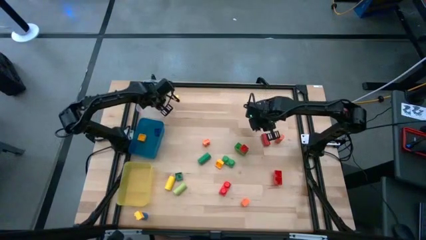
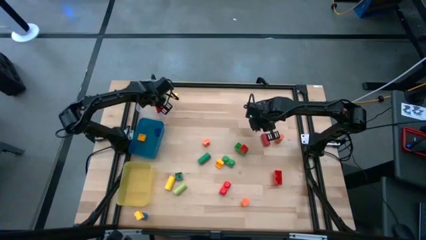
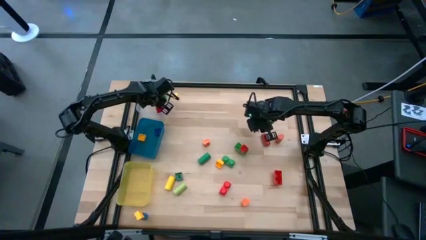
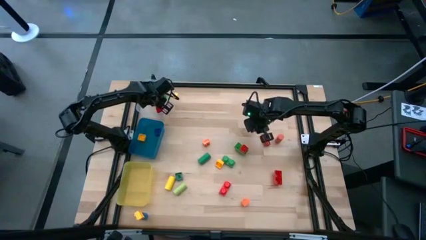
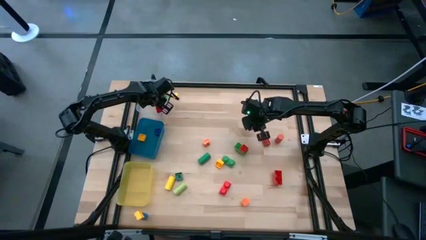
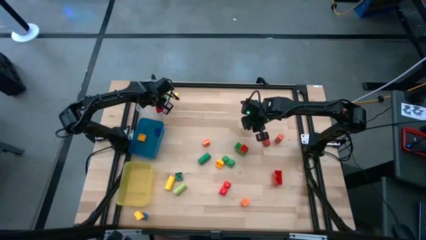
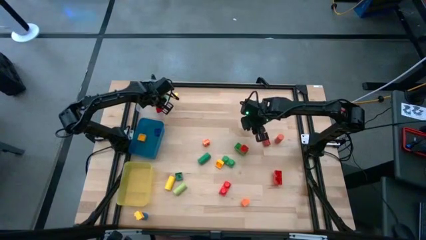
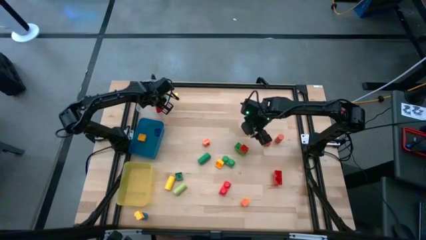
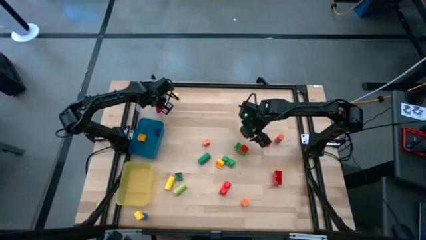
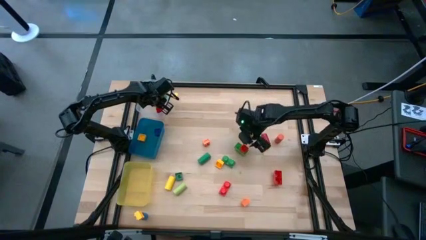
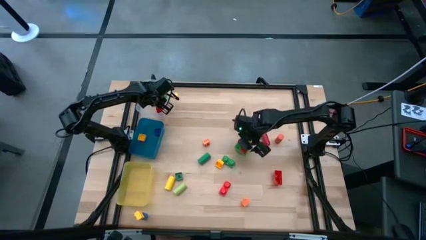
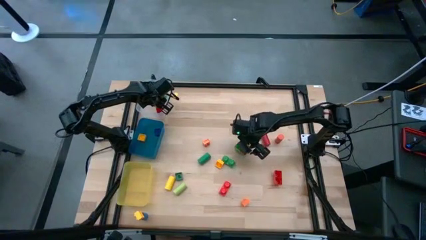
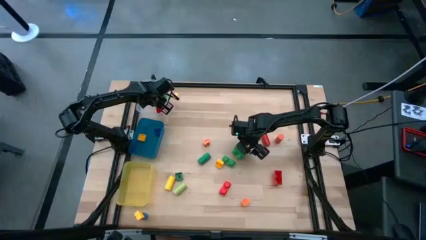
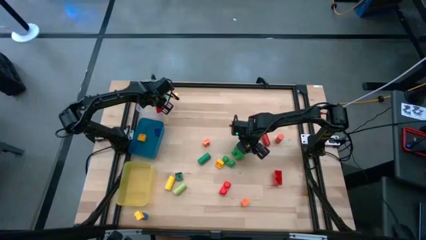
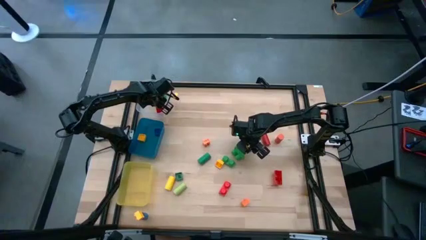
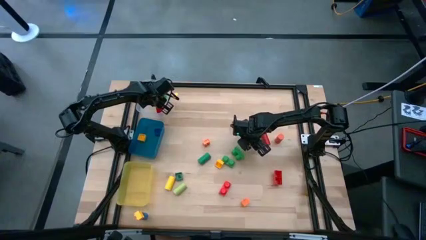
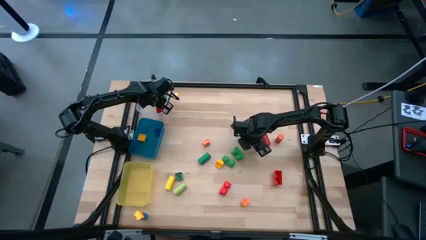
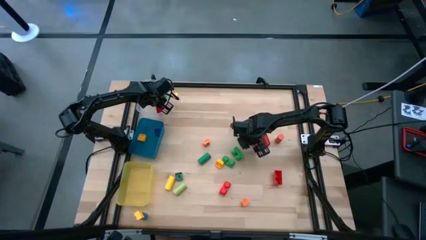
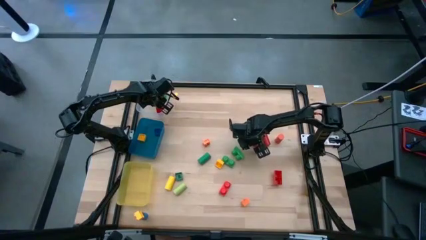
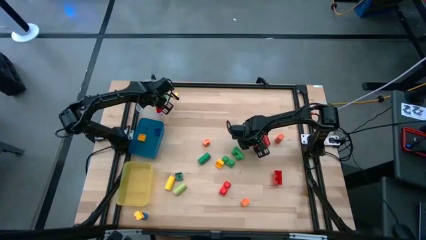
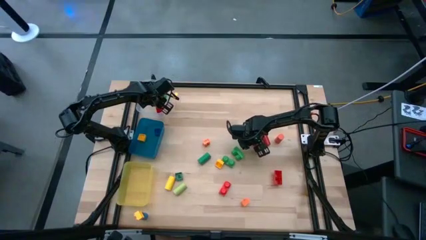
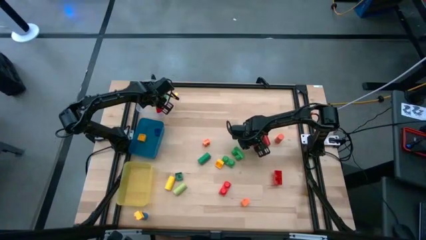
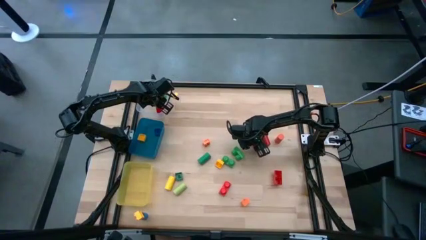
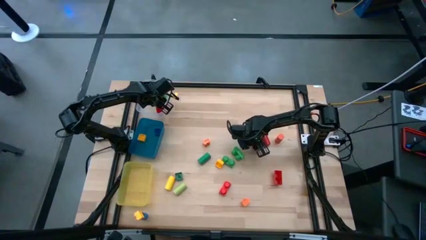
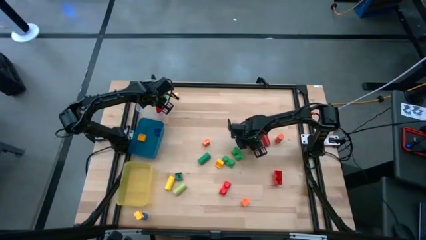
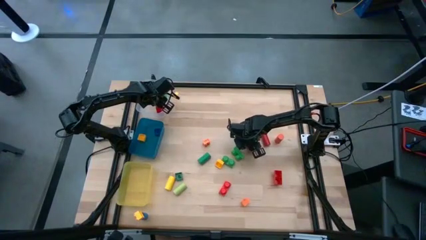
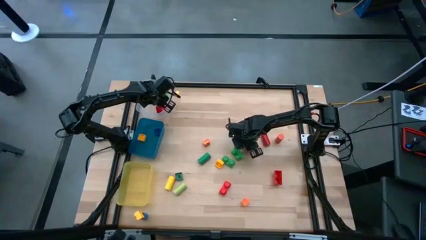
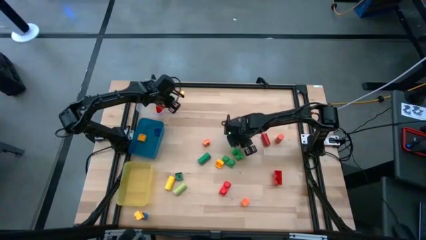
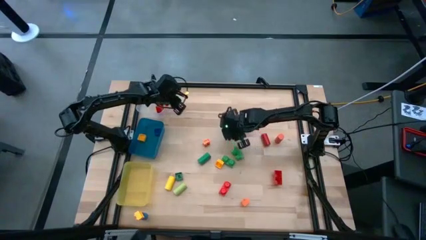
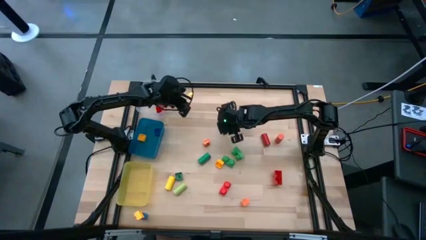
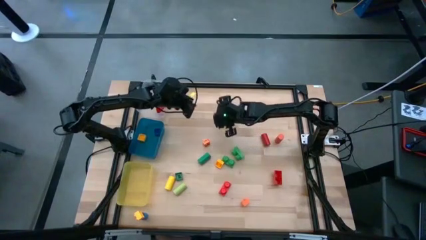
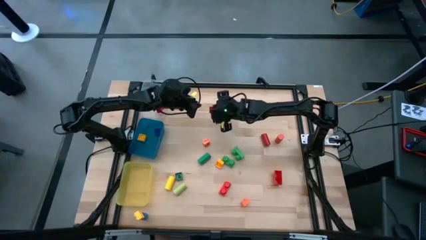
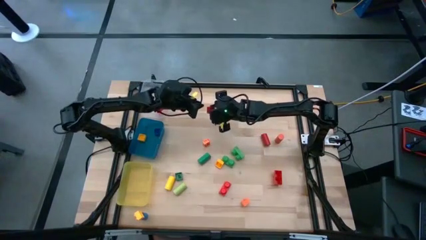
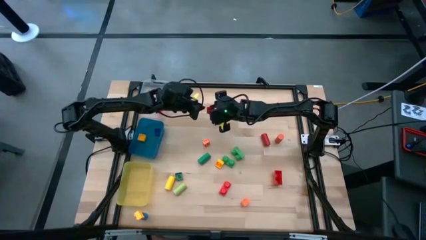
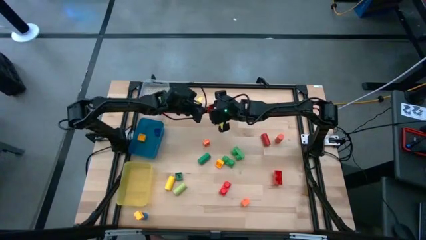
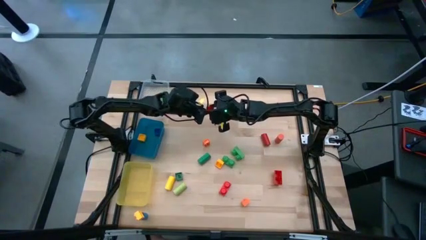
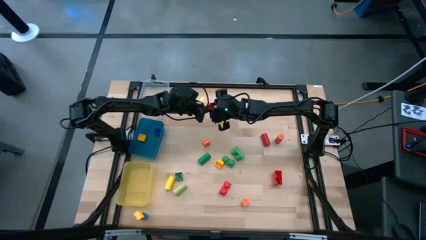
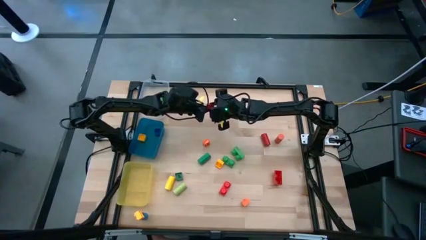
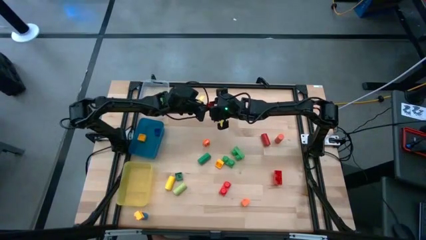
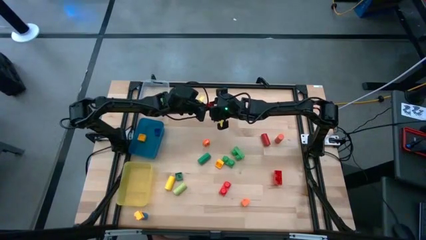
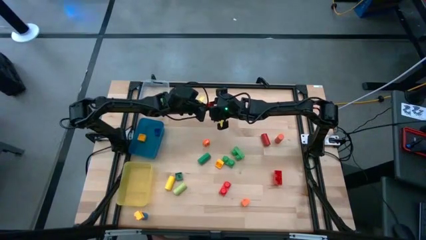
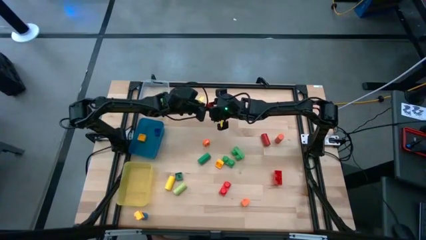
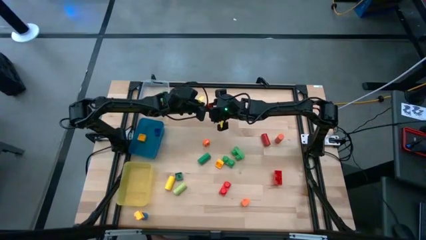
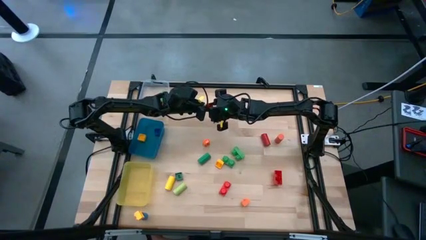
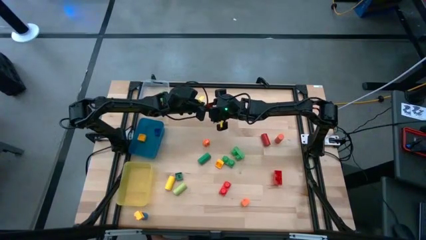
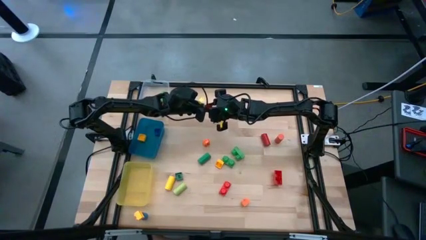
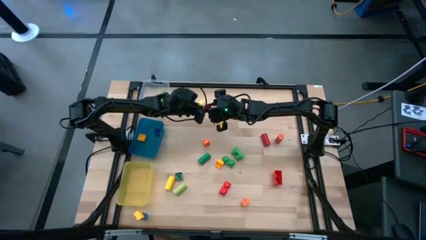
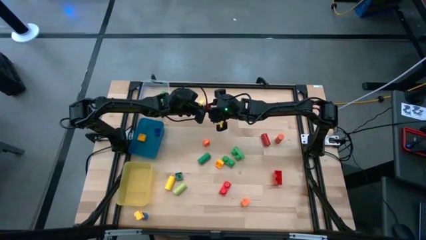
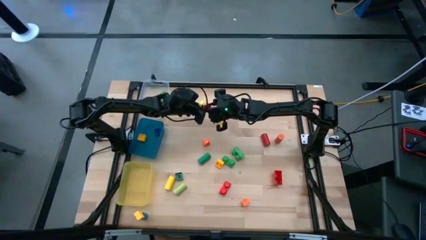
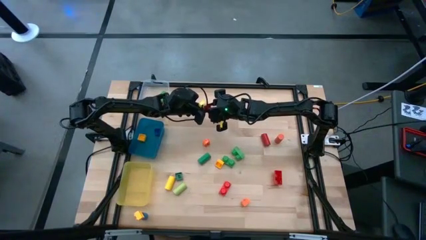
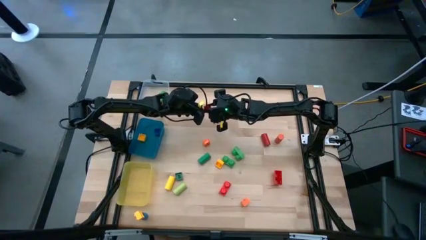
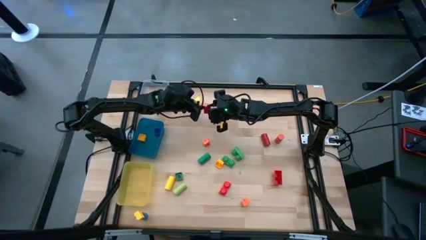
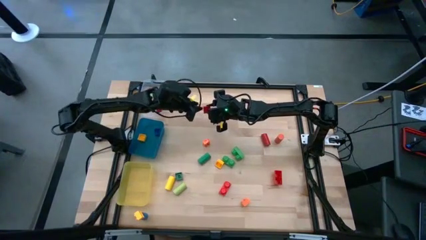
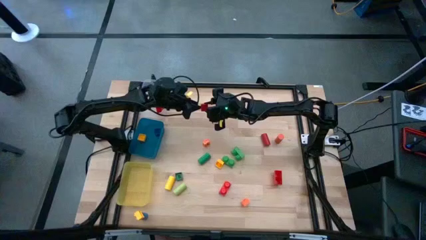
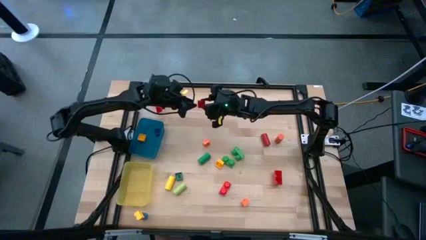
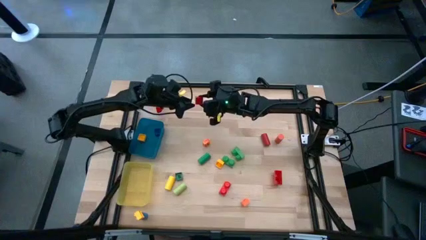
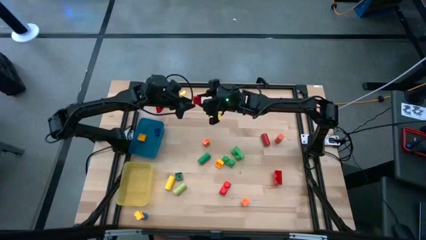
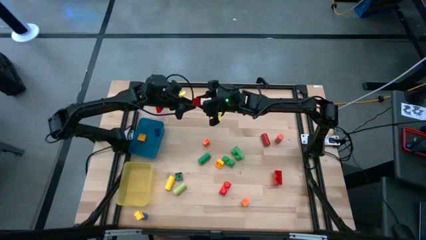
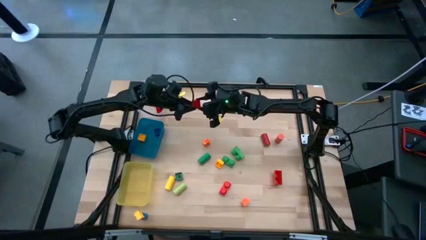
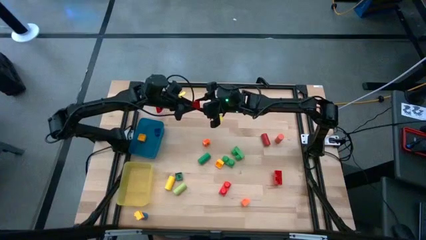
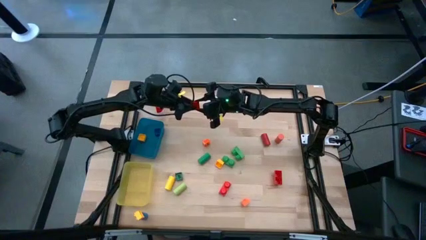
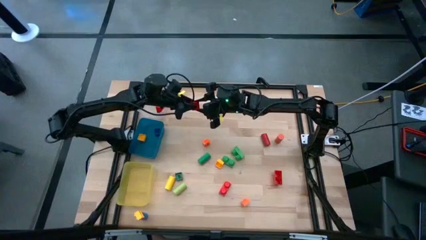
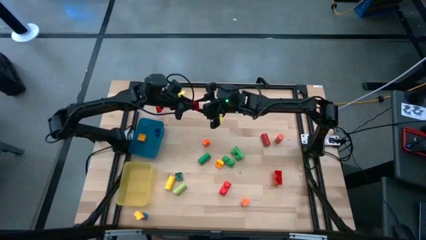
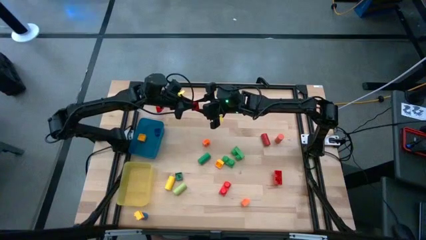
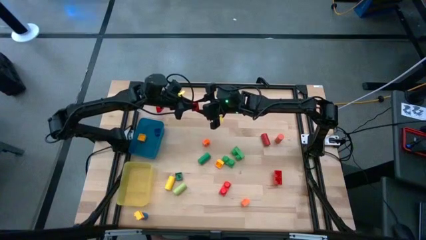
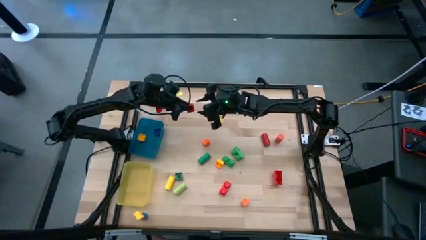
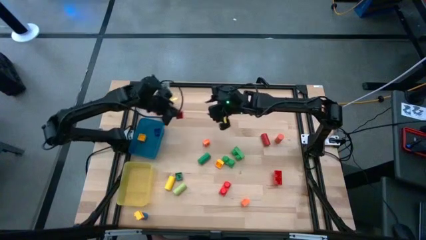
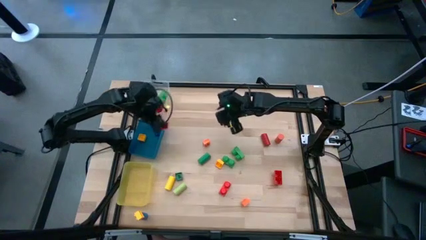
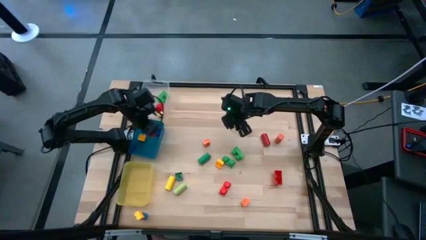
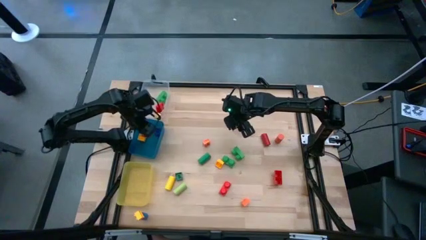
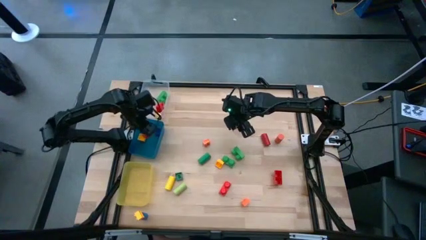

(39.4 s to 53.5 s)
Task: Sort blocks by size
Put the red 4 stud game piece into the blue bin

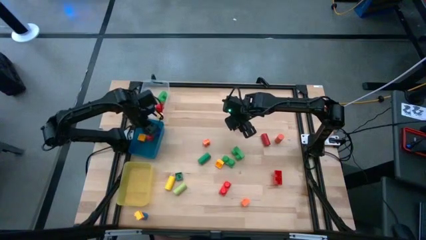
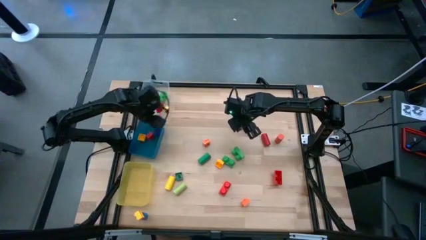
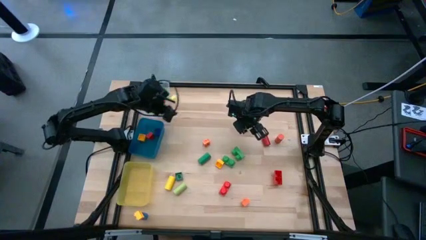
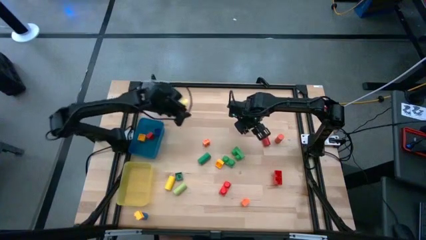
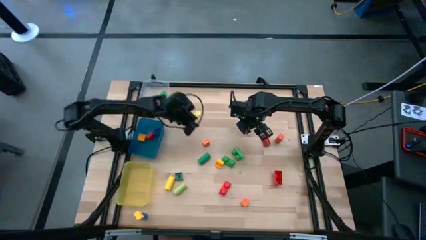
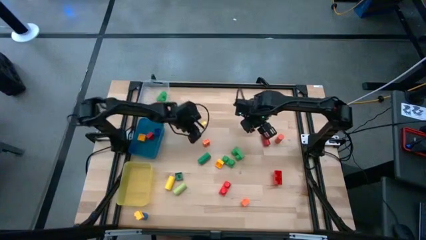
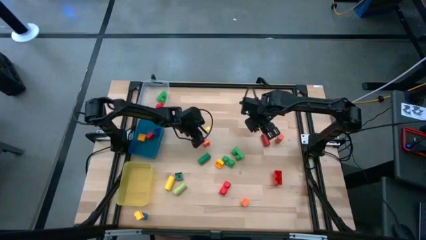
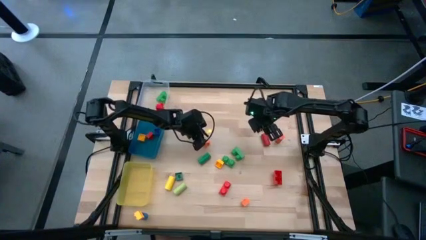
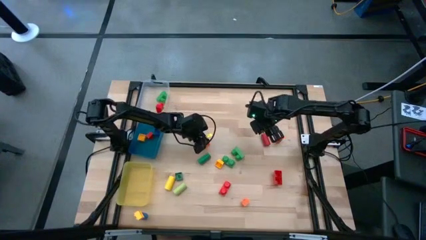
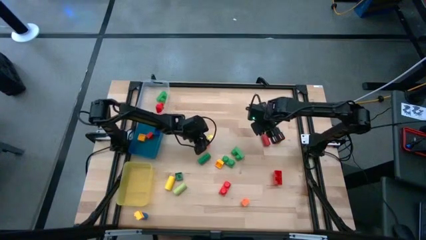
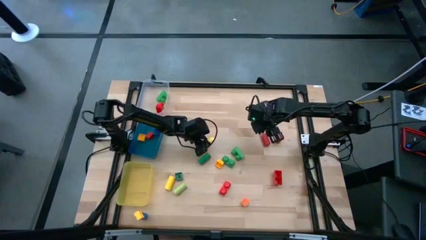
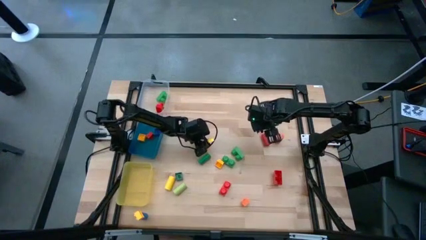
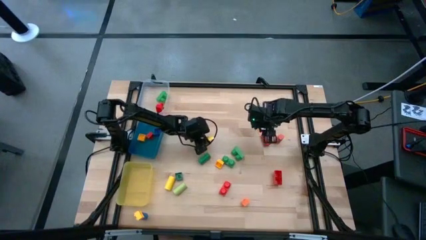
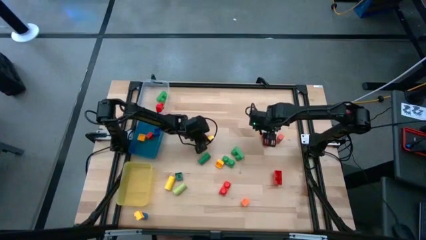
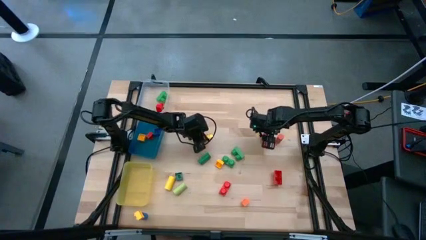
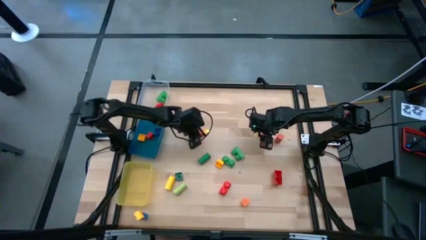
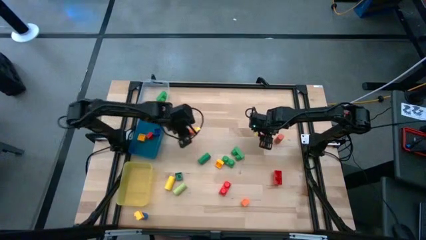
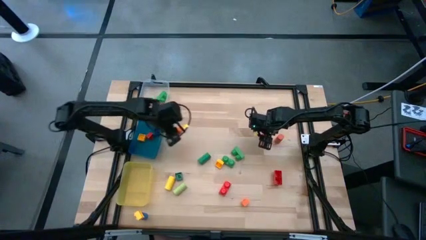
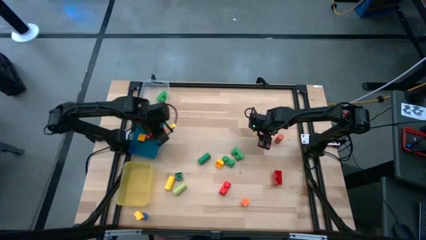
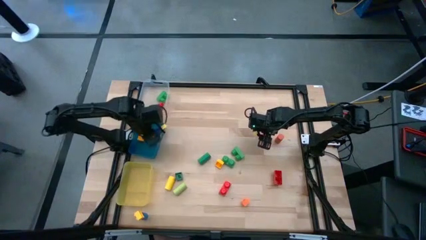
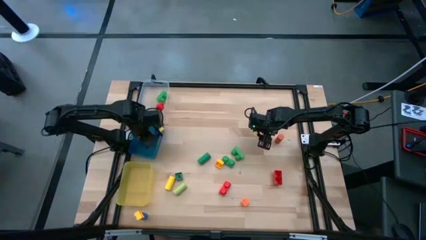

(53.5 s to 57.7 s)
Put the top orange 4 stud game piece into the blue bin
